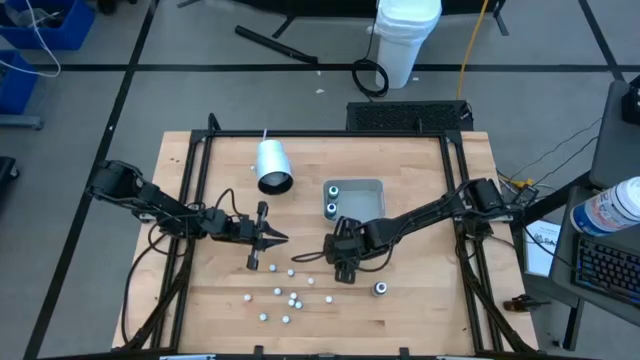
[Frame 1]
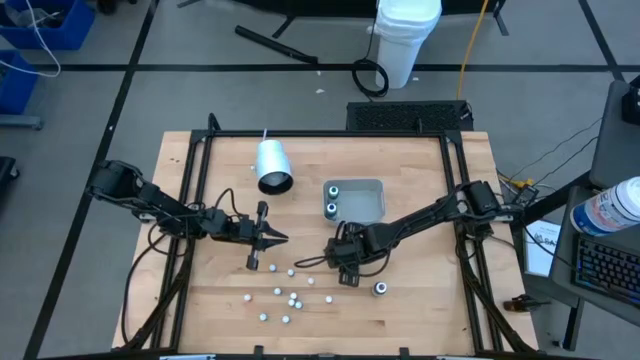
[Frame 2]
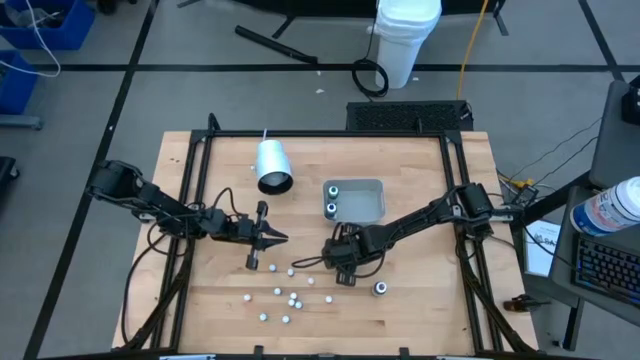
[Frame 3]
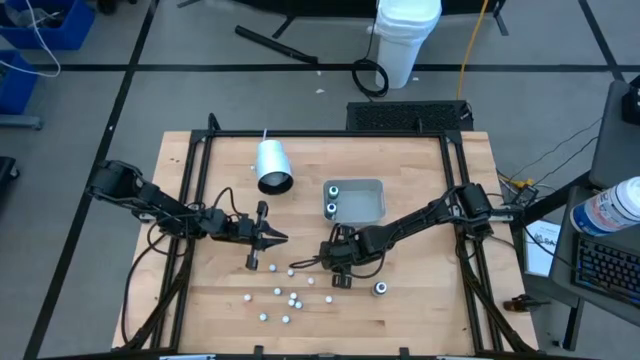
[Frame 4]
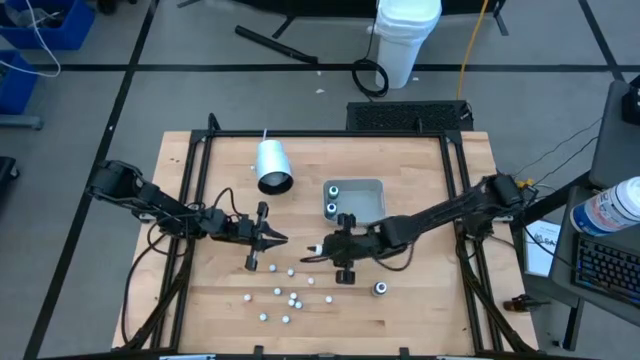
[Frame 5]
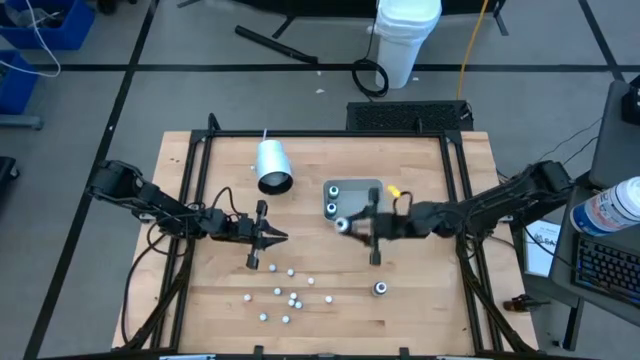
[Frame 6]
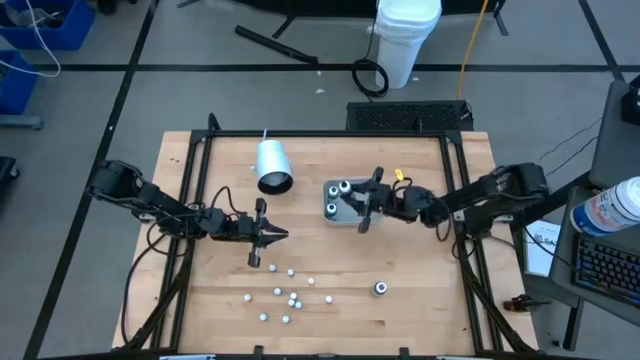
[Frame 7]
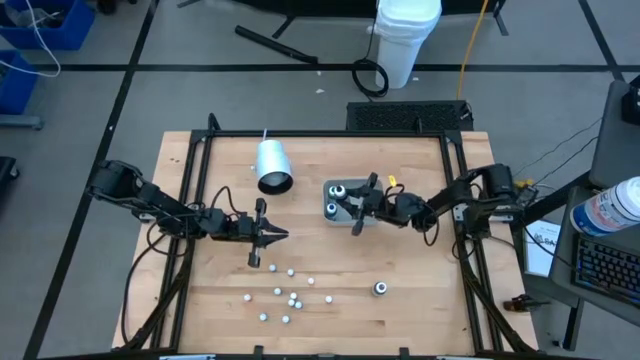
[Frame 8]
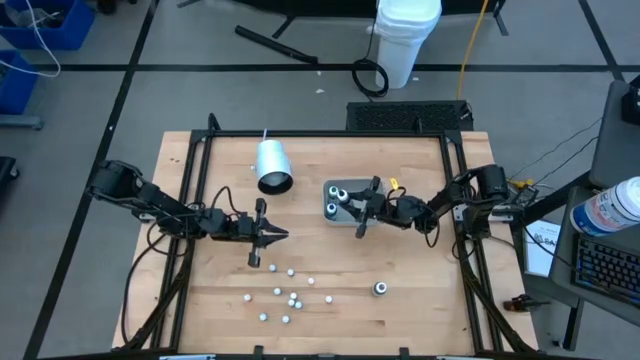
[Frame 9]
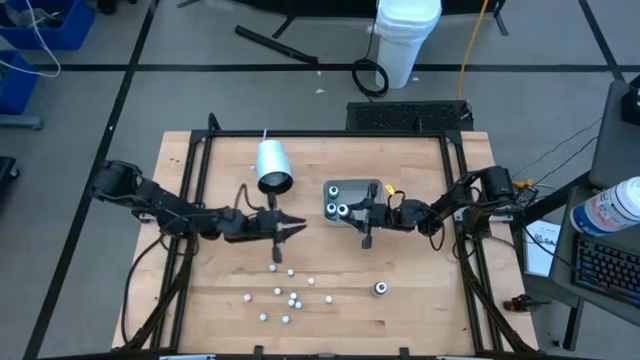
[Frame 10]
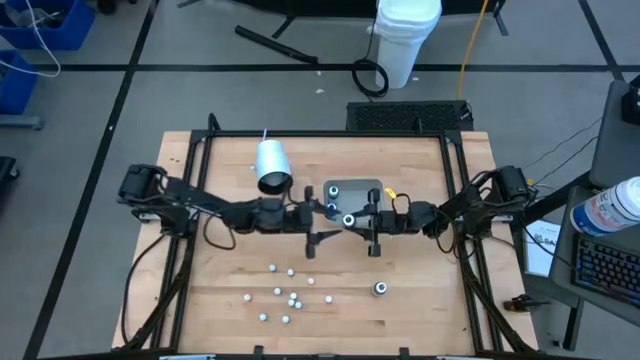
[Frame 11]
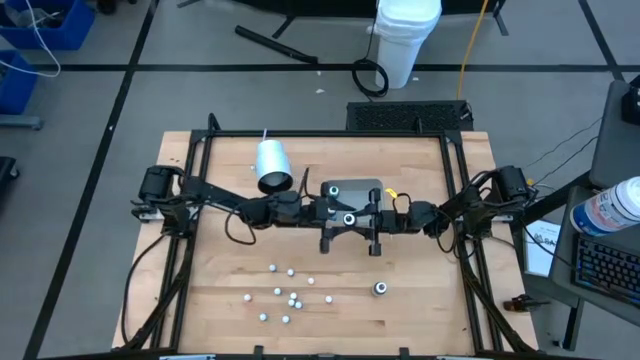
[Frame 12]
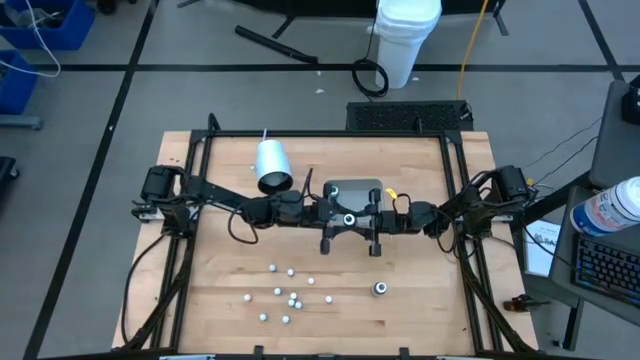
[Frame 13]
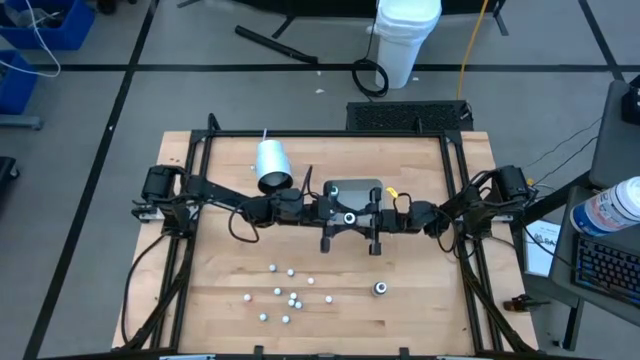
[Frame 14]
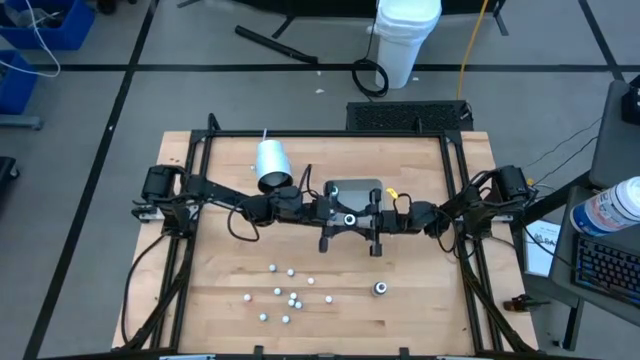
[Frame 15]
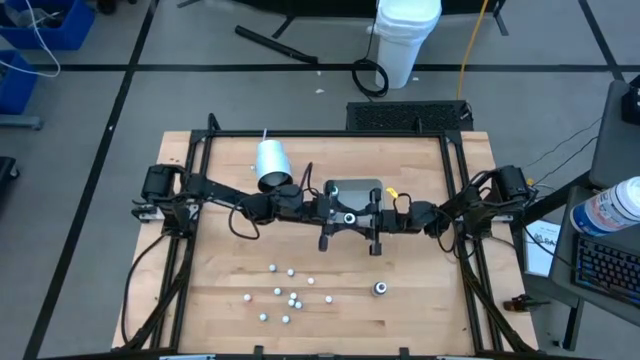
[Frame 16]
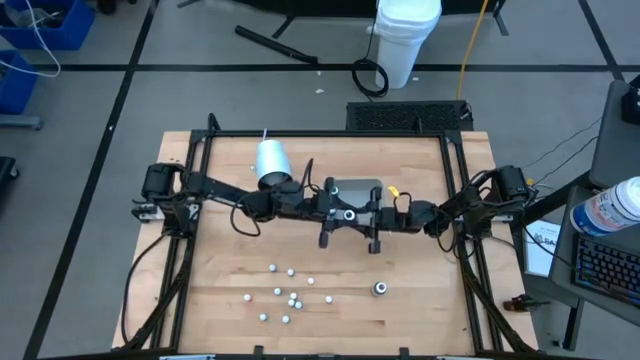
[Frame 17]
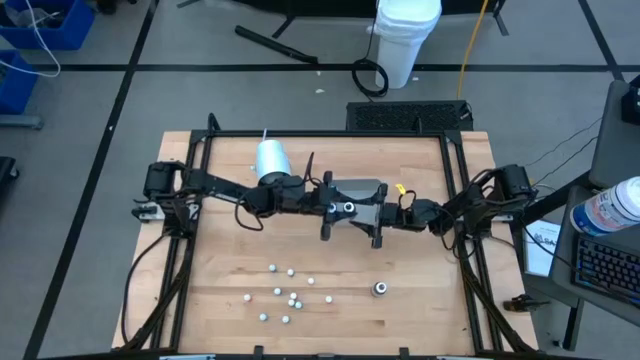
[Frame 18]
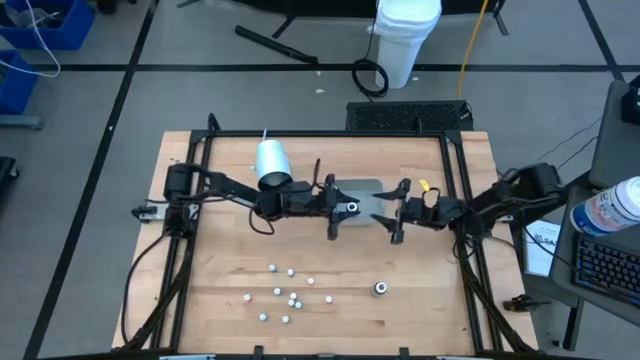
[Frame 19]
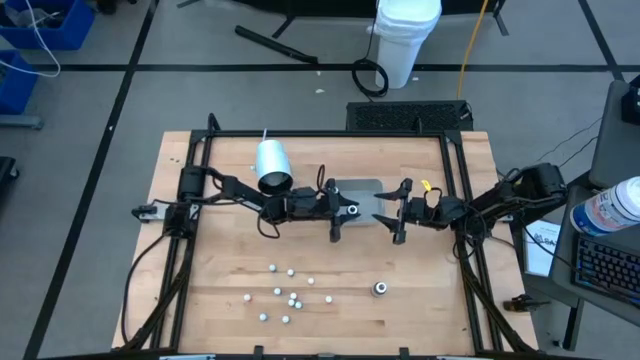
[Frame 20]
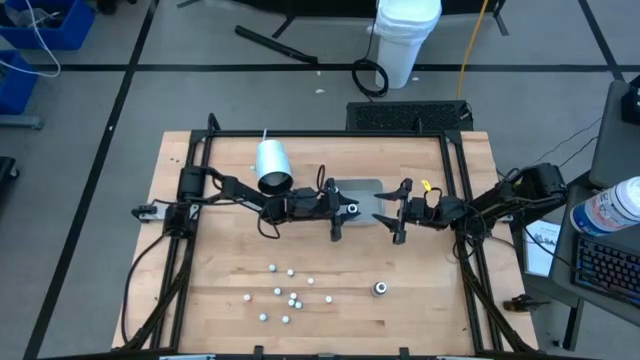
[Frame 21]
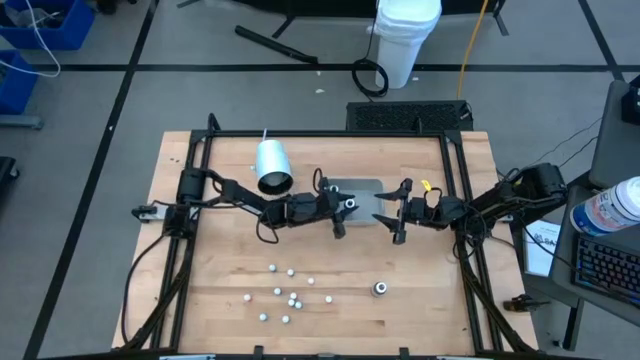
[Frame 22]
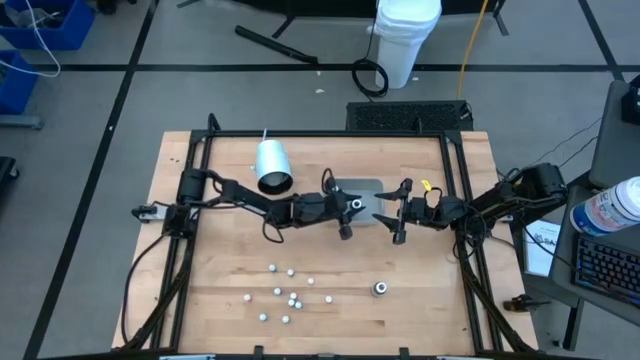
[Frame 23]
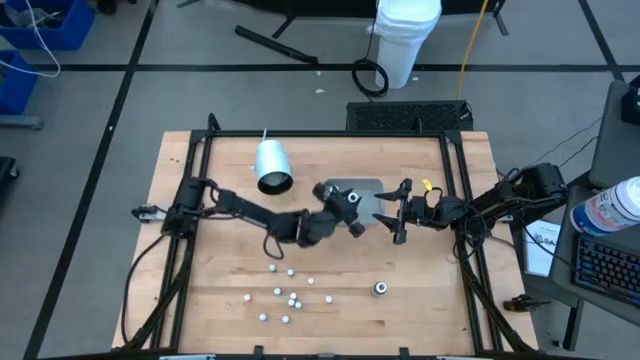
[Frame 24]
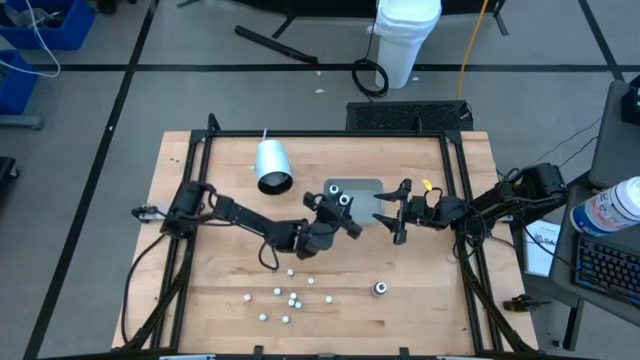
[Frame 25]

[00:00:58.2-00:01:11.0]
Task: Pick & Place food coloring
Put the black food coloring bottle into the gray bin
